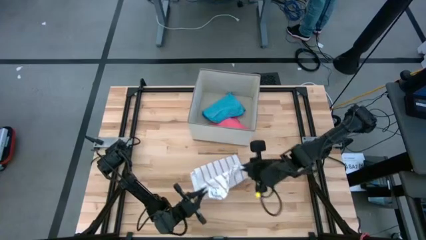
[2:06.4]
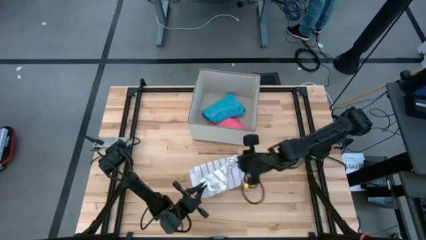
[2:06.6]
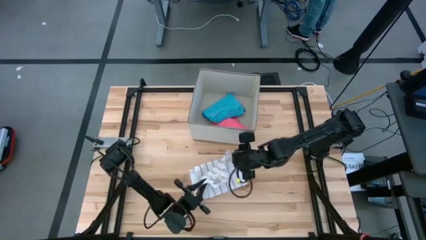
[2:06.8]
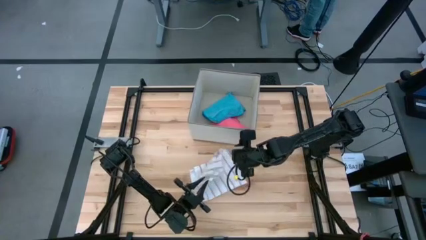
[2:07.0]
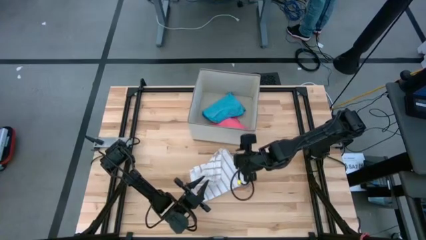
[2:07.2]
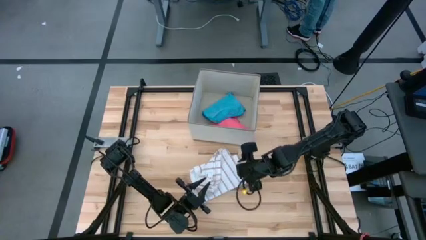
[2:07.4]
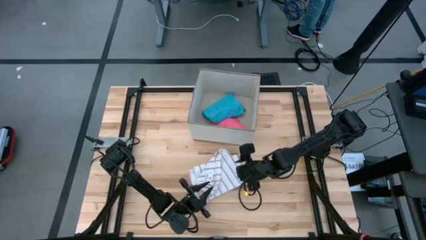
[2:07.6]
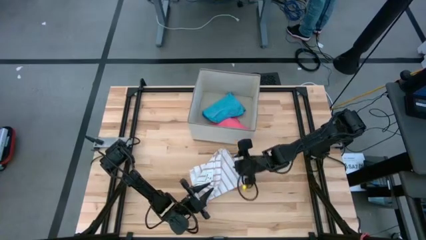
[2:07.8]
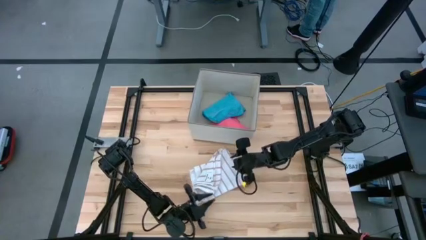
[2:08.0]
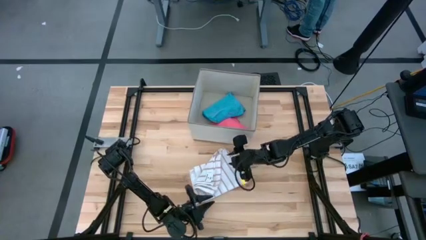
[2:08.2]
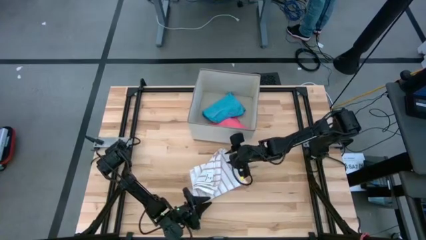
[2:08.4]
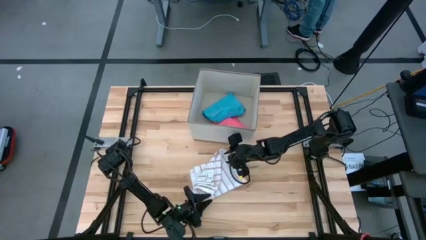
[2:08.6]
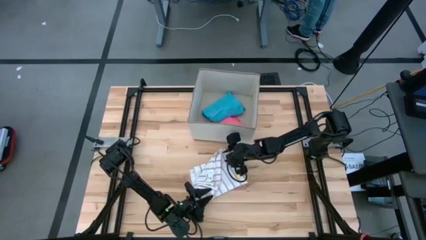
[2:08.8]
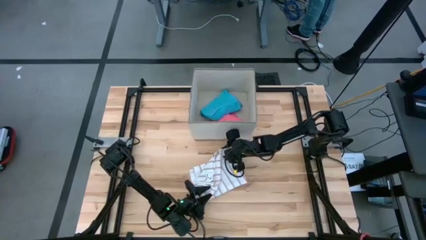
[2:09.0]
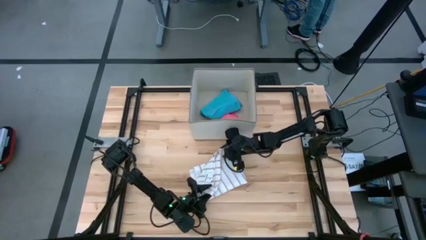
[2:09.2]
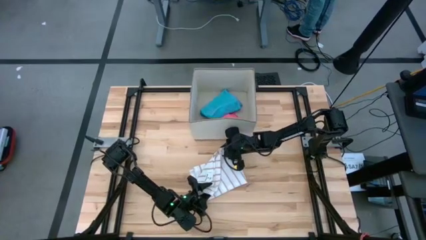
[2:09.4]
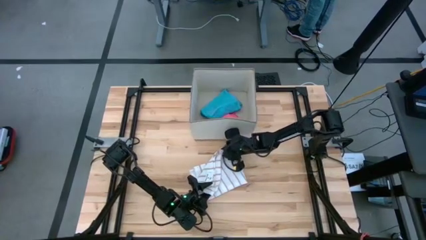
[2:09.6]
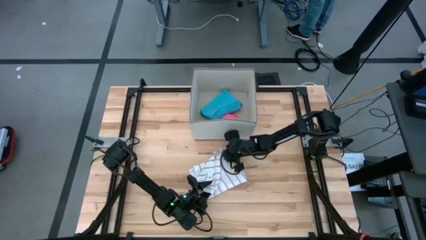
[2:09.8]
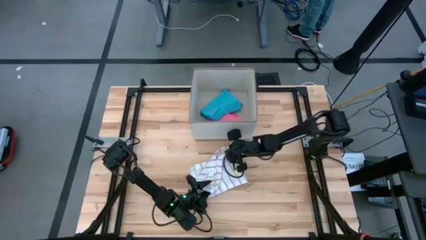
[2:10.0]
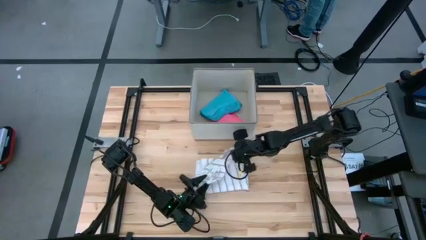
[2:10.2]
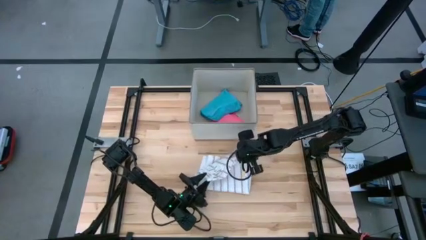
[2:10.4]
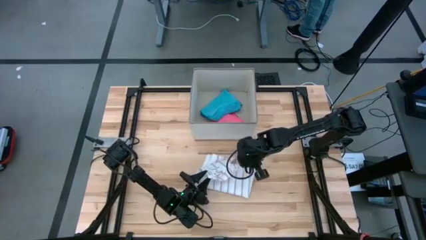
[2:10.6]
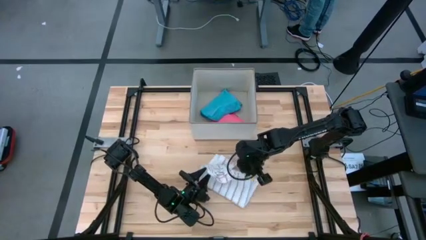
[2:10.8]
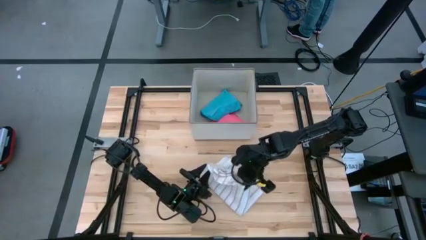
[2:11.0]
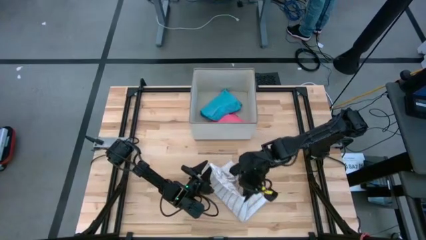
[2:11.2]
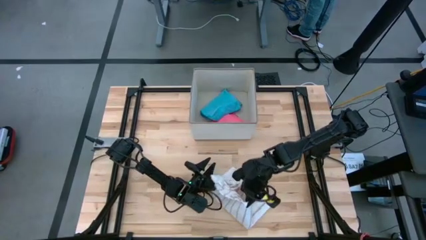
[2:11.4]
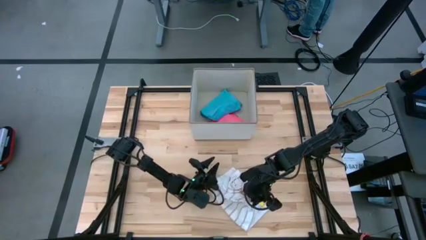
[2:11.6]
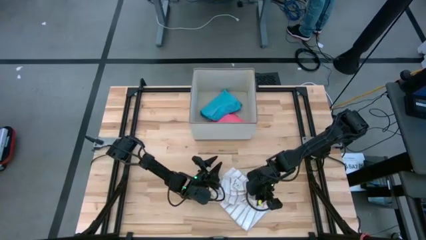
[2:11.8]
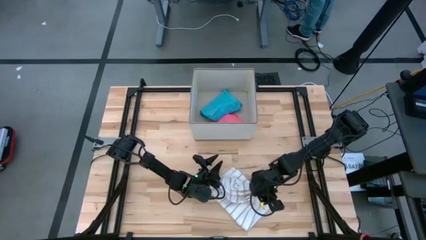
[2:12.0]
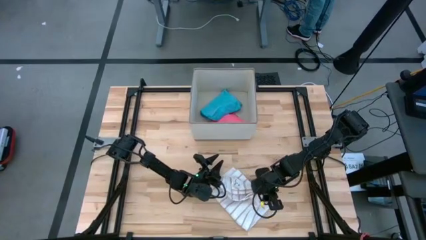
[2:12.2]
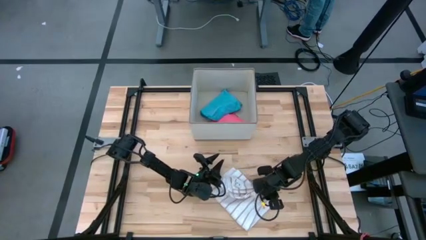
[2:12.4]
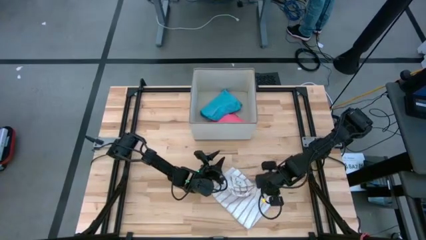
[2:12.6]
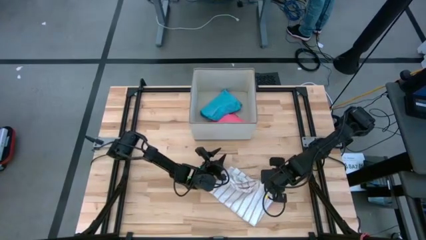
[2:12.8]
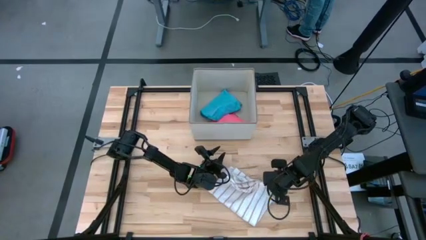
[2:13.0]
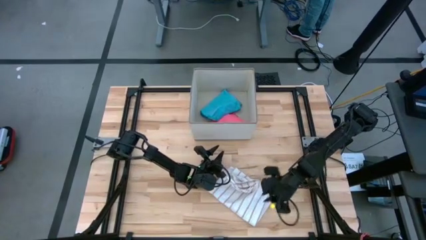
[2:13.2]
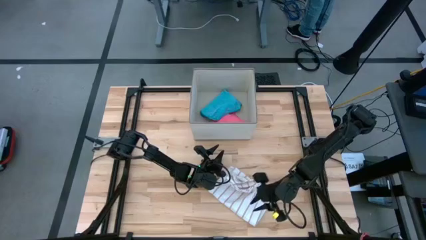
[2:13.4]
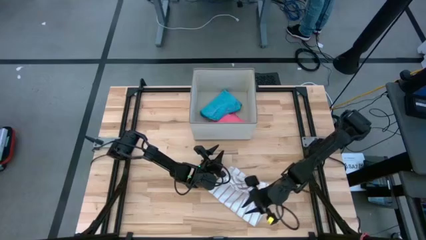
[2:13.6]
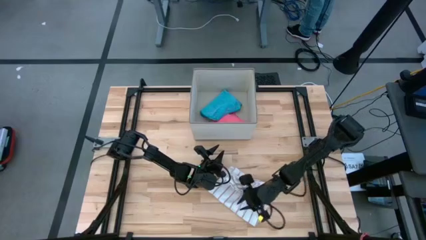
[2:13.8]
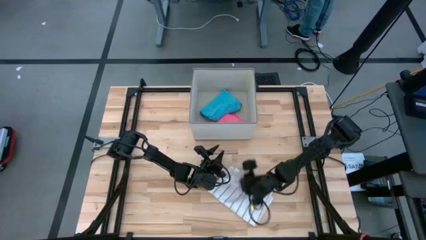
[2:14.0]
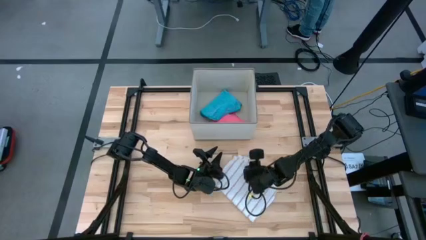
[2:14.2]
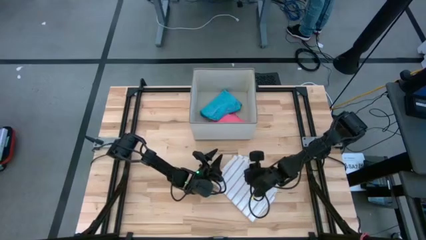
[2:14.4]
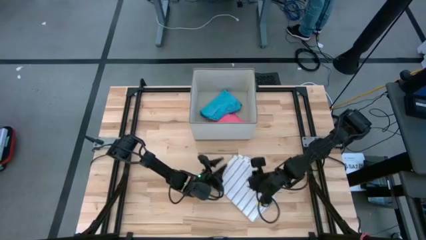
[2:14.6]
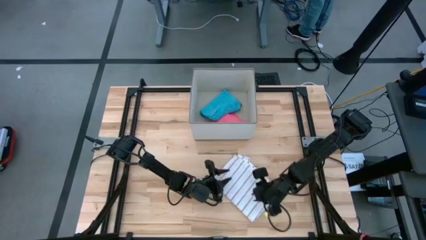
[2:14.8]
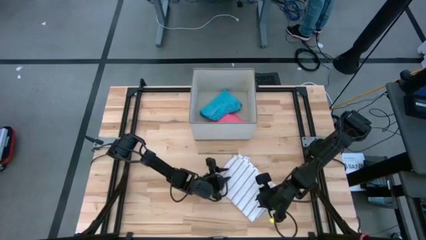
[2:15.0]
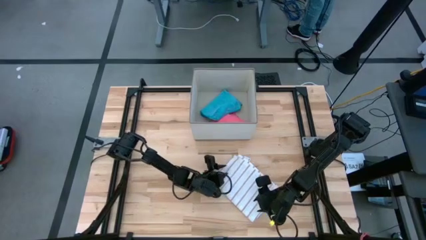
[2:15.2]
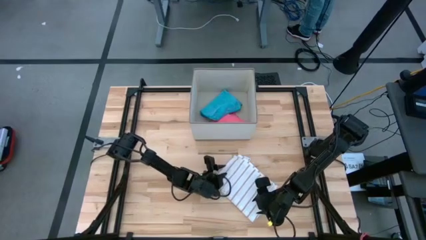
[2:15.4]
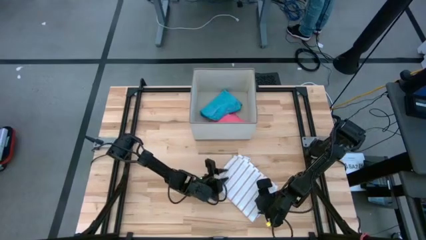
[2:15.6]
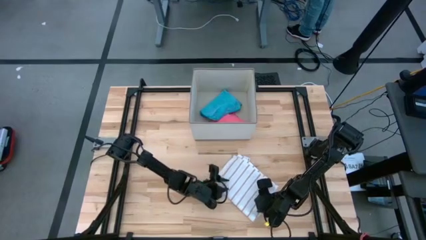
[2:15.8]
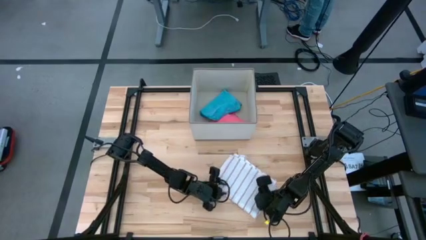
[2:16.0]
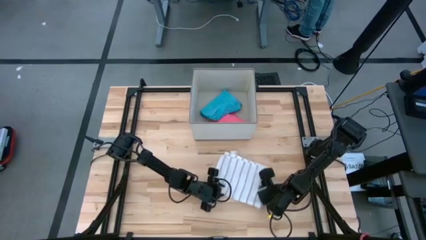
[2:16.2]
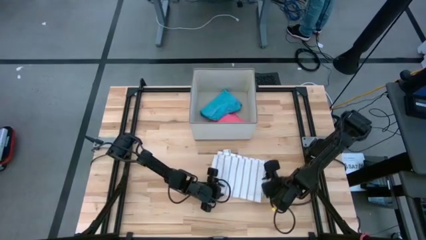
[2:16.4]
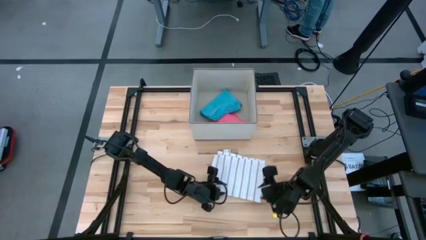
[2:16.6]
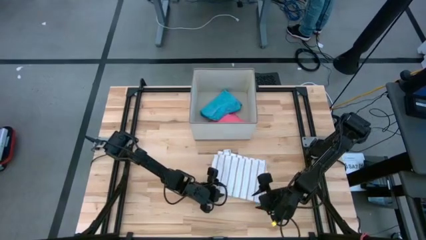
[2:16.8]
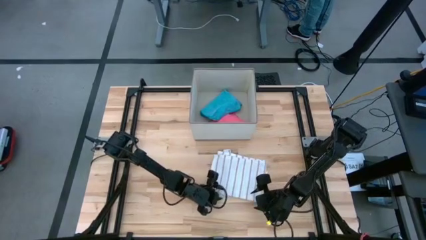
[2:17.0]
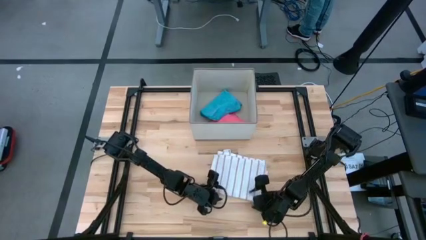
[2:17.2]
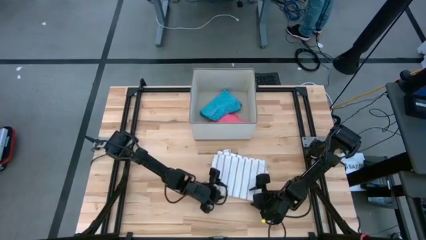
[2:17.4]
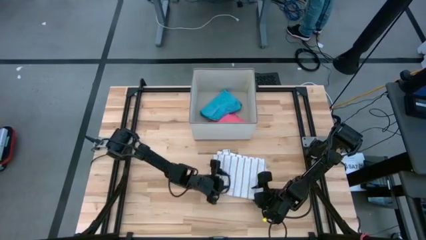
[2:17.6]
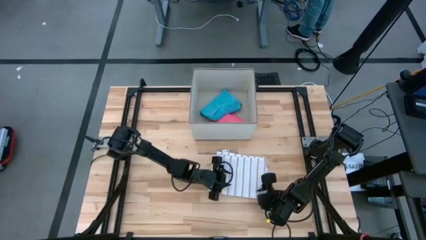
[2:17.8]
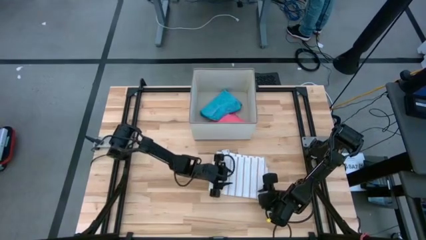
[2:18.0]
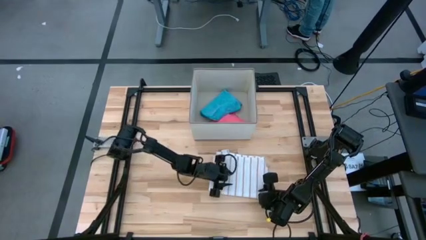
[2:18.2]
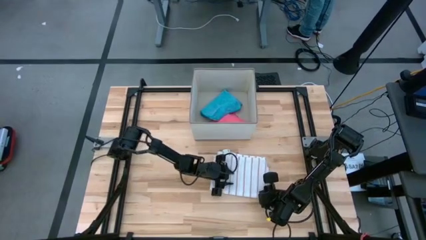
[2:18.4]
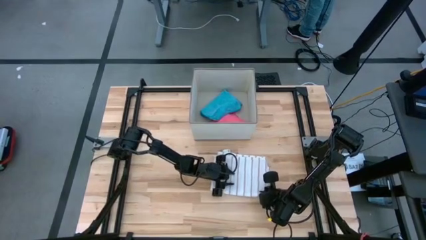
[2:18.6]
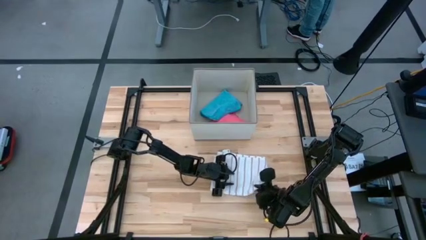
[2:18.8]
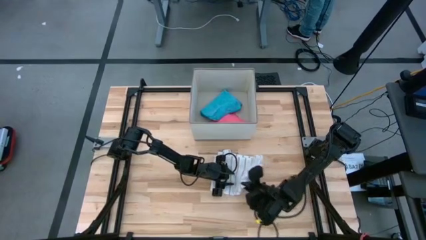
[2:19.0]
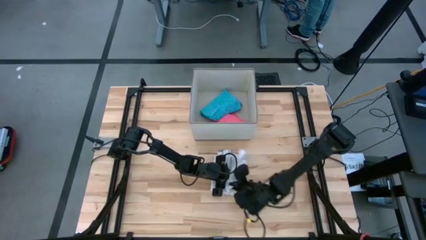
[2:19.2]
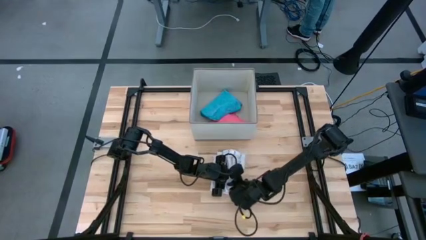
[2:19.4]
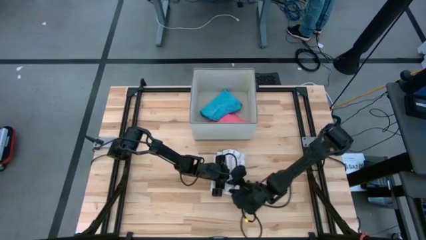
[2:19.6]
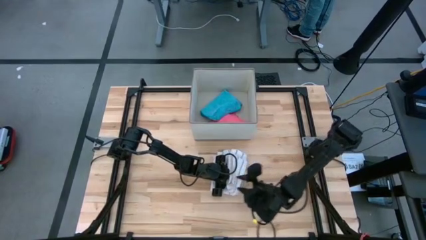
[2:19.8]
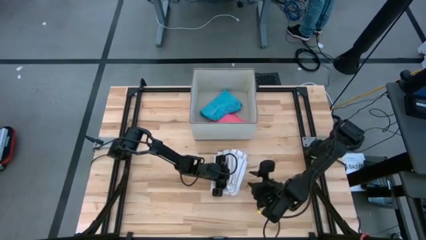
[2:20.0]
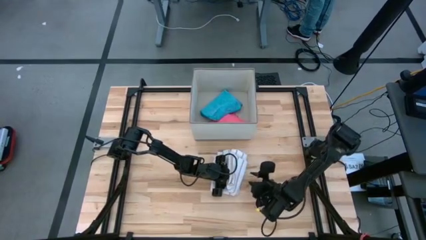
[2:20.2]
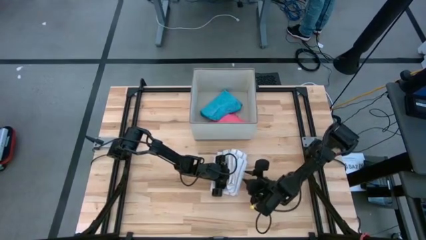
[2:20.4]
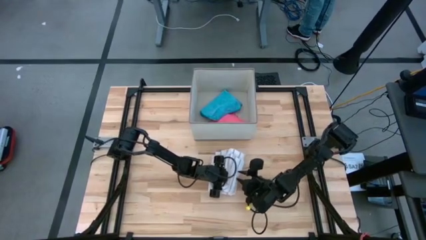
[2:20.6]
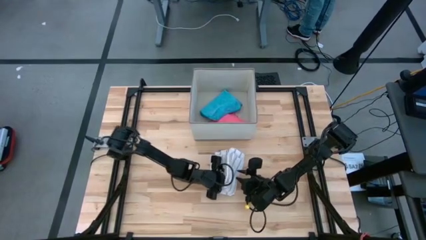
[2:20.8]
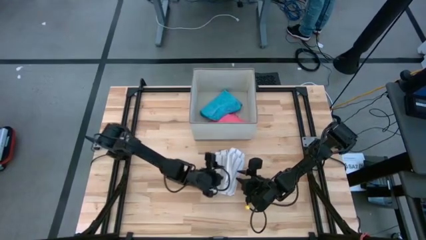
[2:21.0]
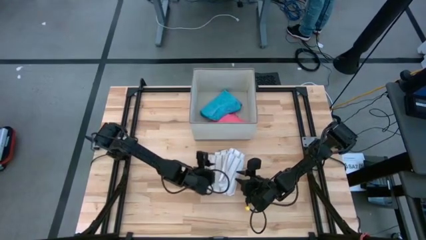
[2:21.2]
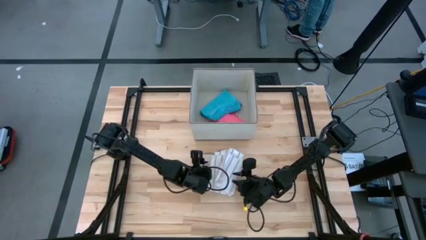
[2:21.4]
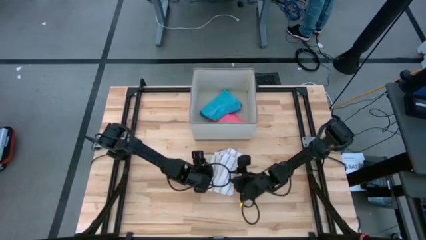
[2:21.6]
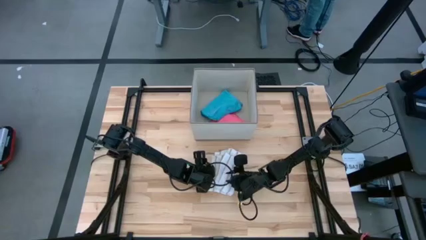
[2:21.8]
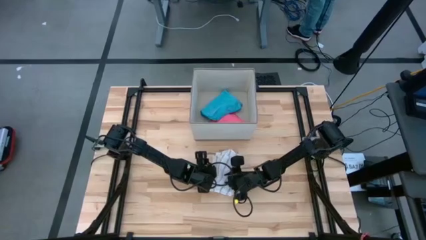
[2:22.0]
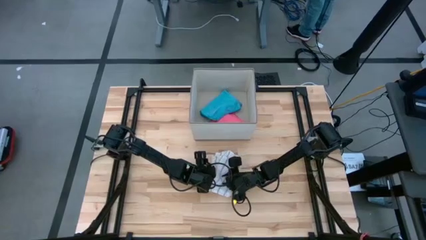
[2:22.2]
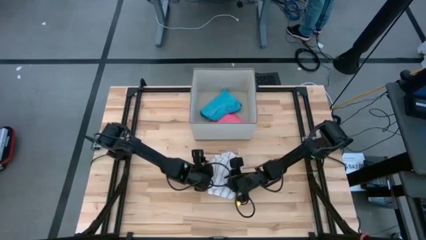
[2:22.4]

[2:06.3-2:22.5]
Task: Fold towel
Fold the white towel
